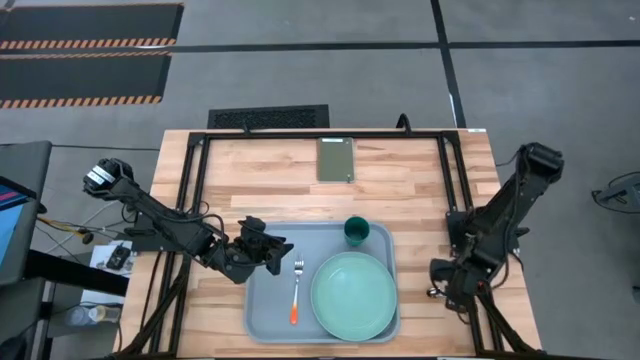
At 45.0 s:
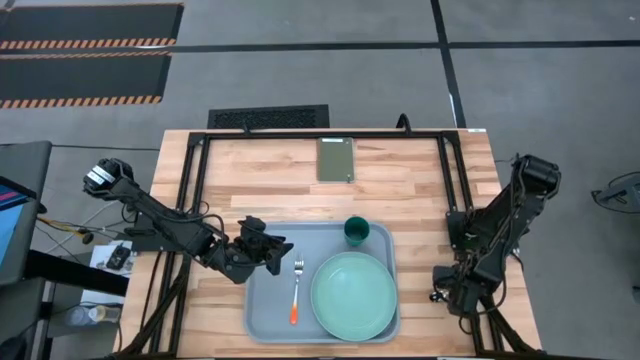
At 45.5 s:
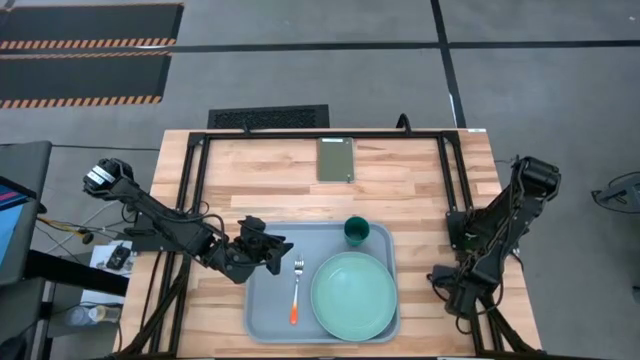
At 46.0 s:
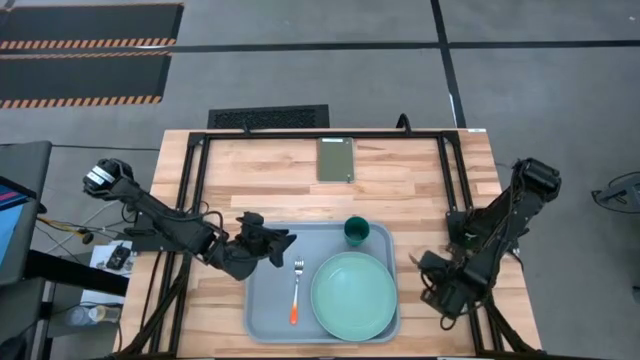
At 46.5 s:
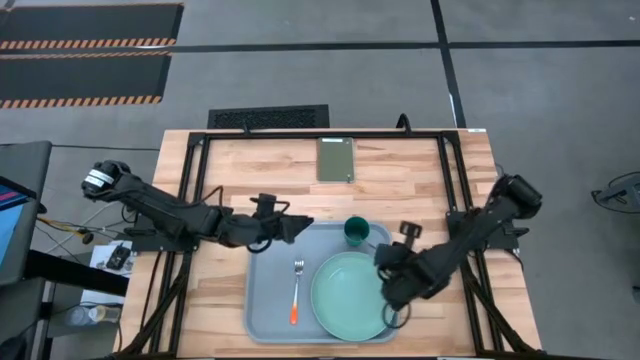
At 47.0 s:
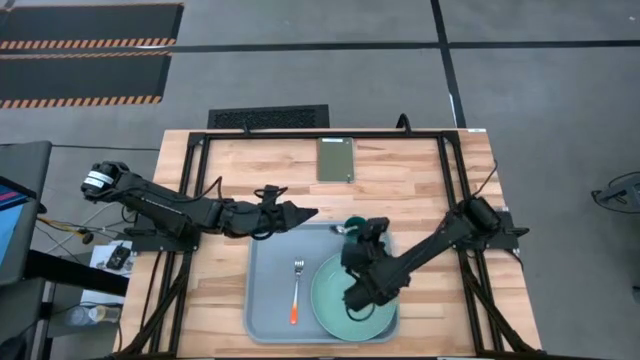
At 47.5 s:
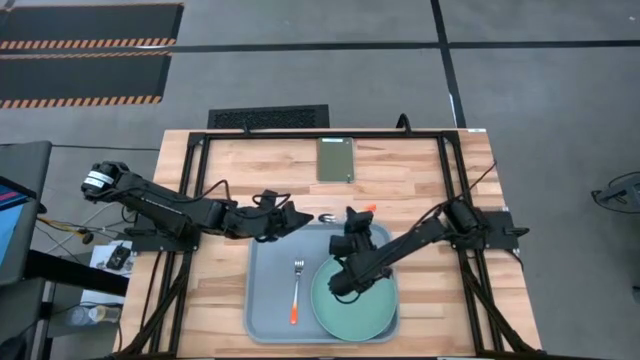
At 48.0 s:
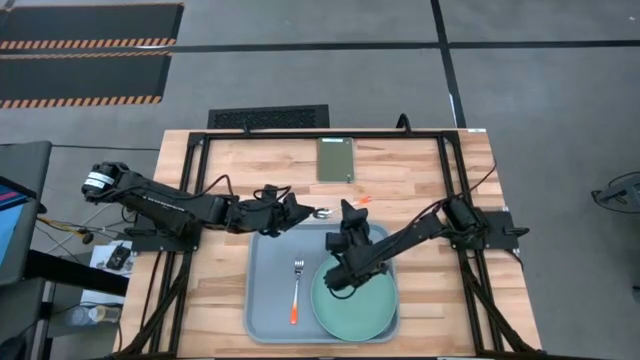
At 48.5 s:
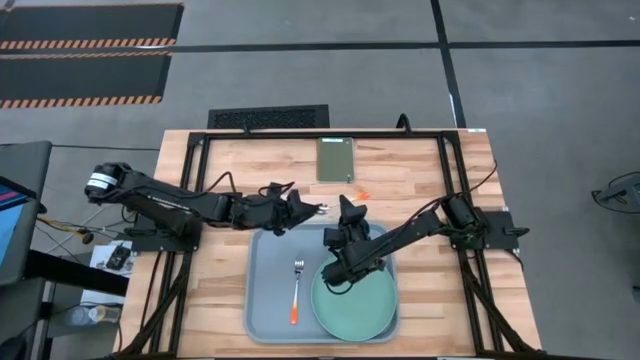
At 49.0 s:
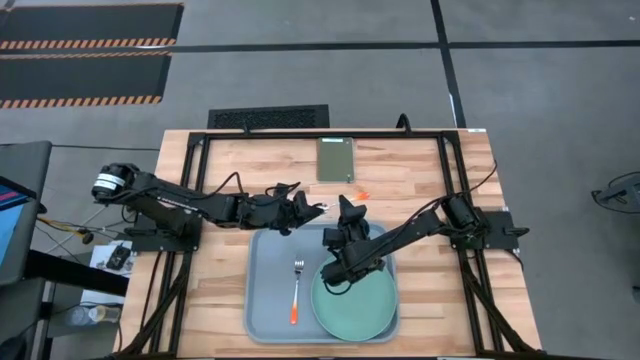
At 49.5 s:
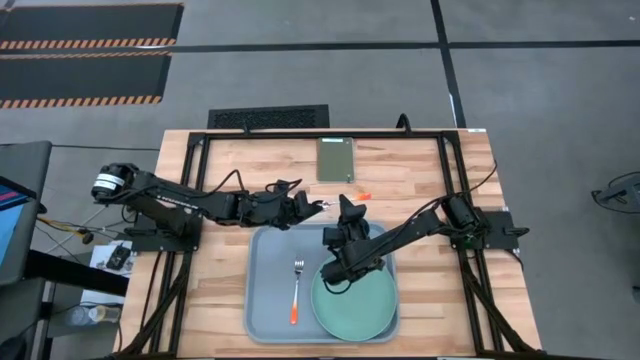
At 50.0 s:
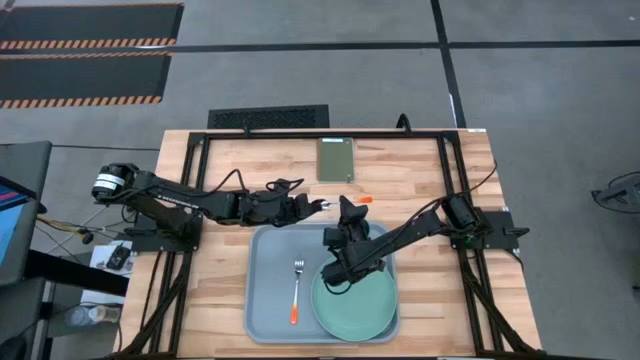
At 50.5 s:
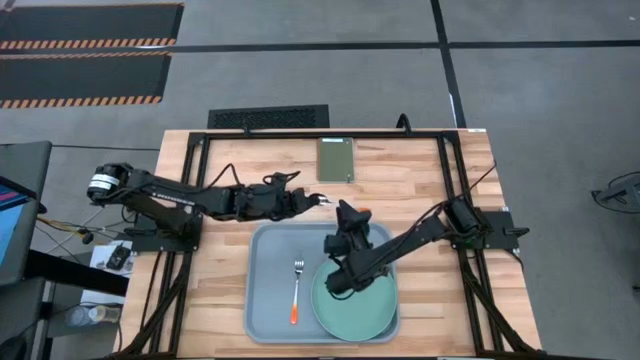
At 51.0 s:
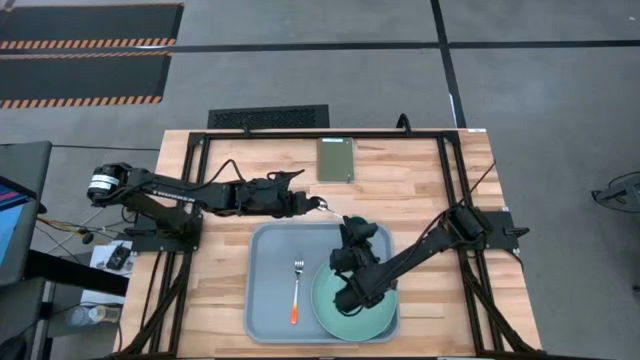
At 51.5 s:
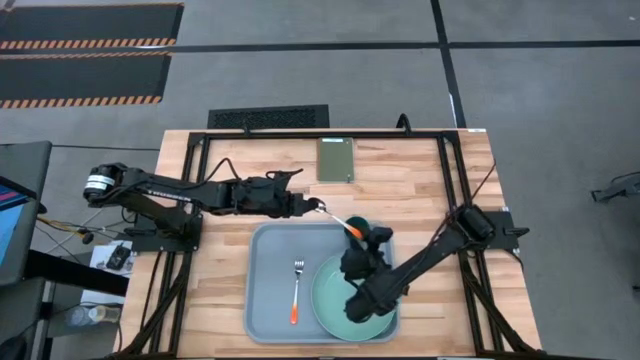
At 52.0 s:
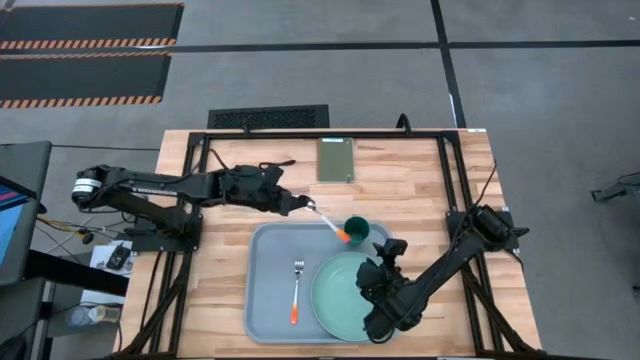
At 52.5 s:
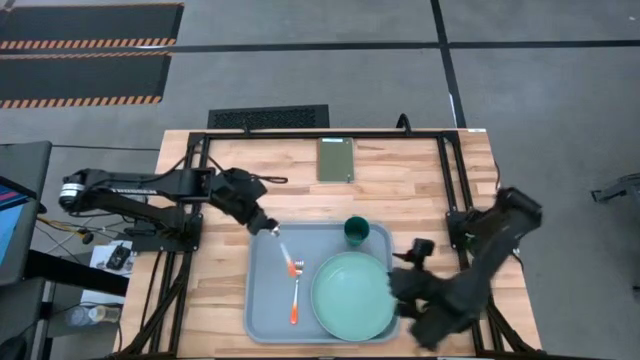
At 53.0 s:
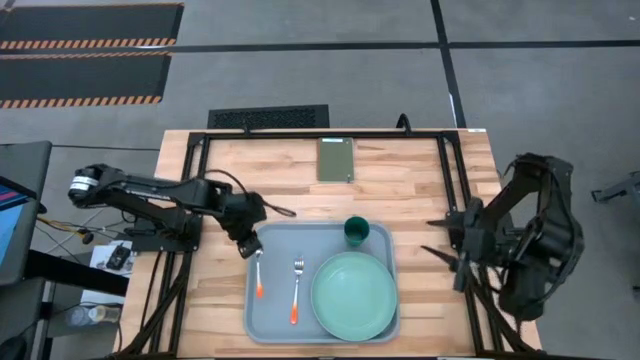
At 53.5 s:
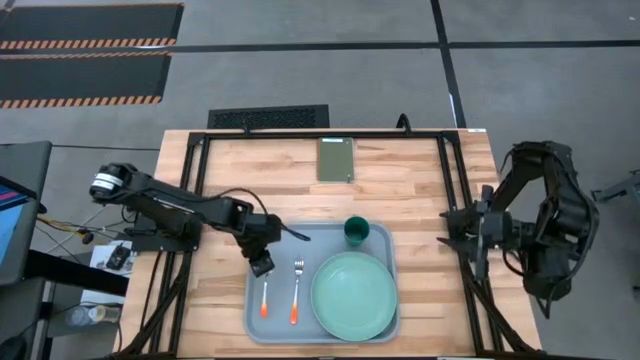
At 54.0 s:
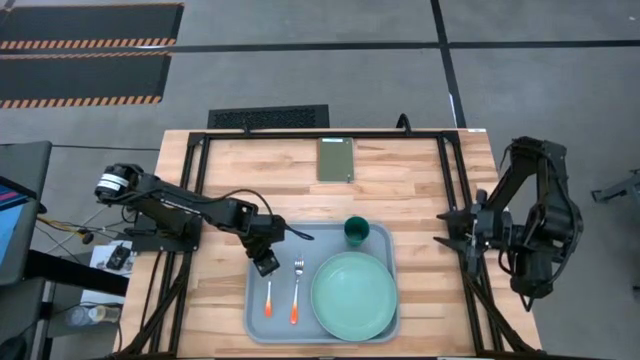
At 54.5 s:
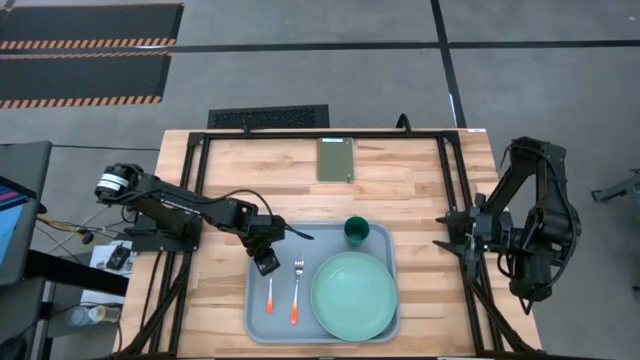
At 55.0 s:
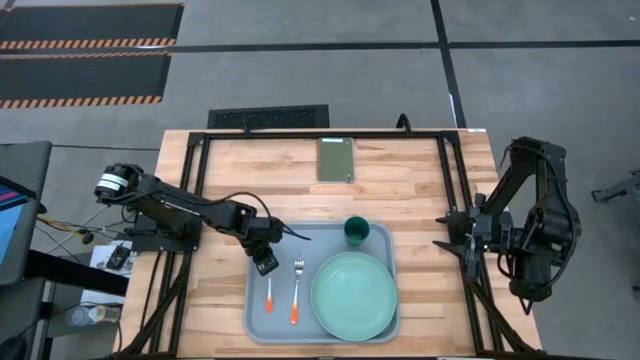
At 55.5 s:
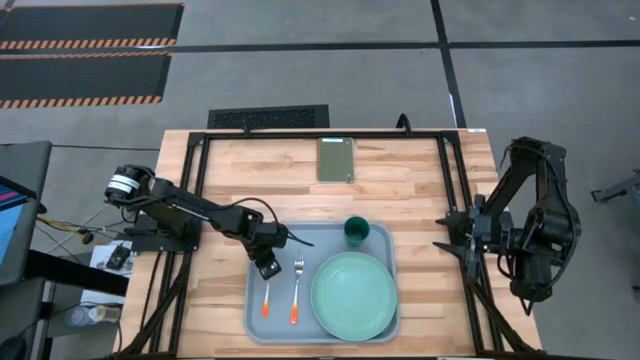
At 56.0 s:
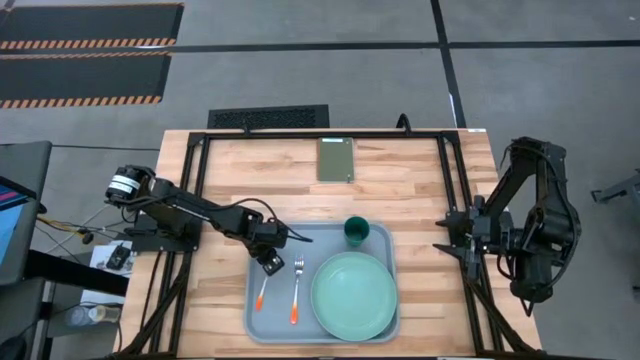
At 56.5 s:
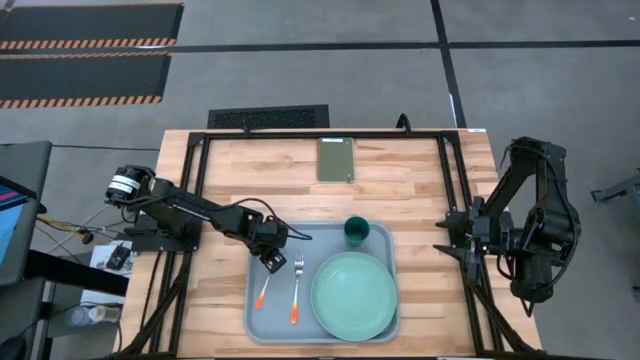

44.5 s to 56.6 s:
Task: Pick and place plate/cup/fork/spoon on tray
Put the orange spoon on the blue tray to the left of the orange fork

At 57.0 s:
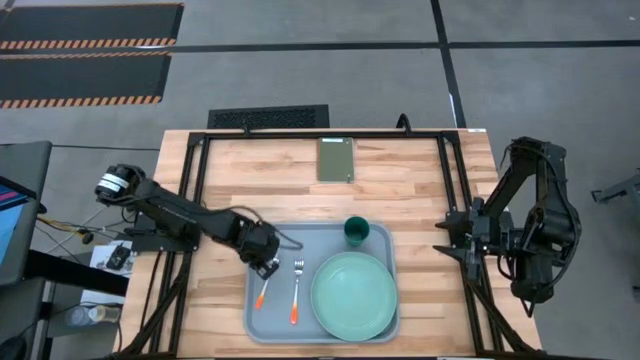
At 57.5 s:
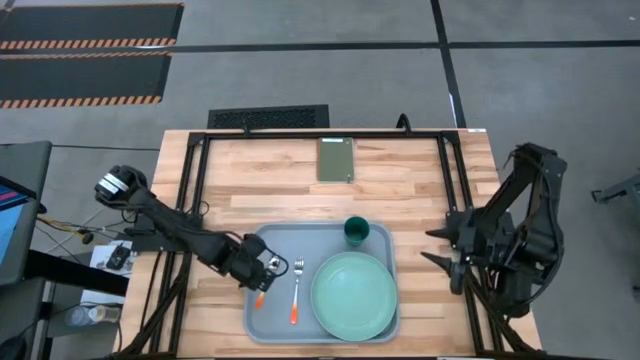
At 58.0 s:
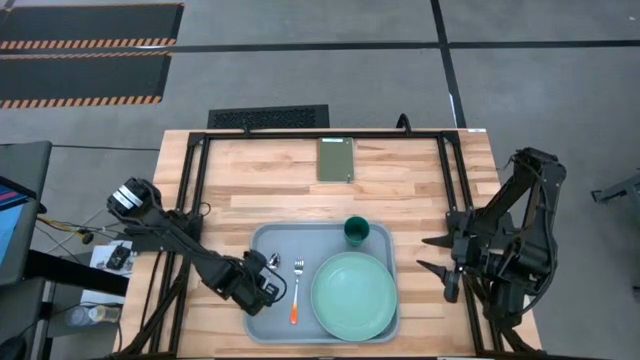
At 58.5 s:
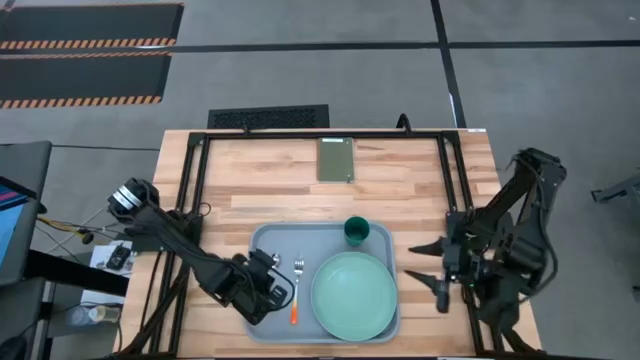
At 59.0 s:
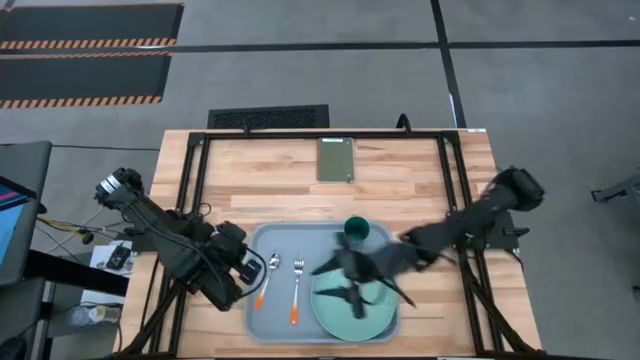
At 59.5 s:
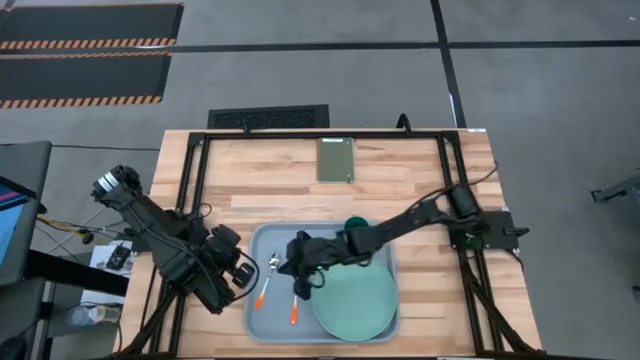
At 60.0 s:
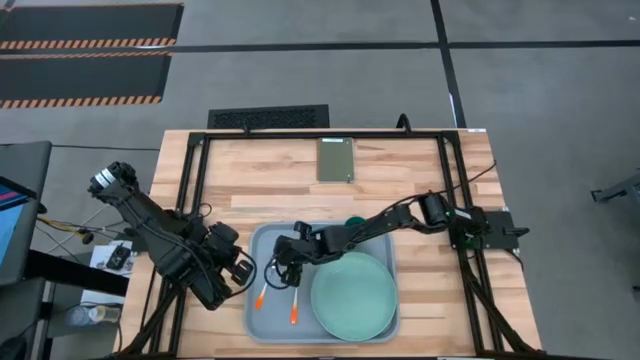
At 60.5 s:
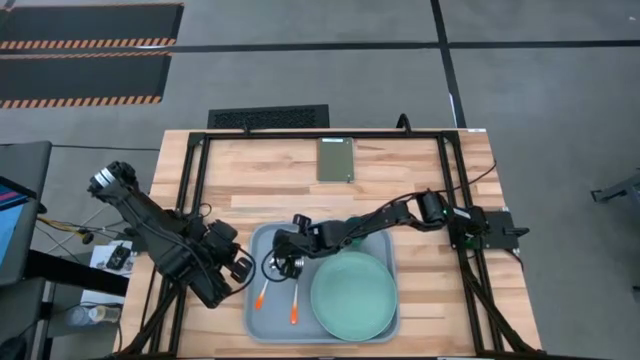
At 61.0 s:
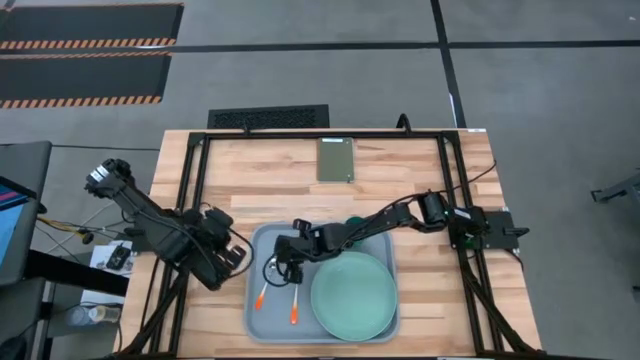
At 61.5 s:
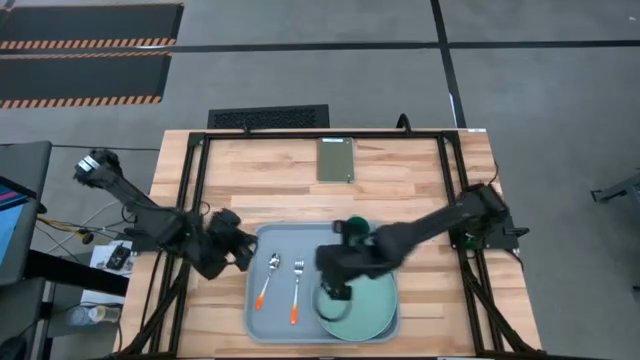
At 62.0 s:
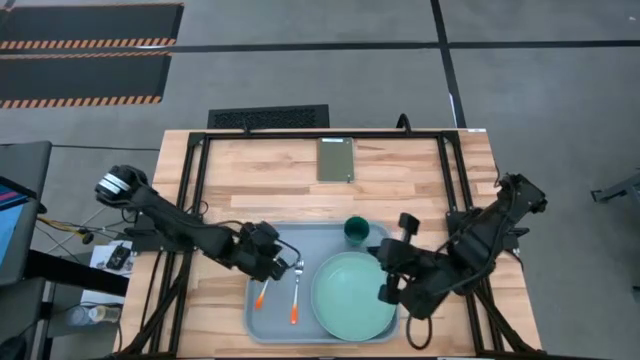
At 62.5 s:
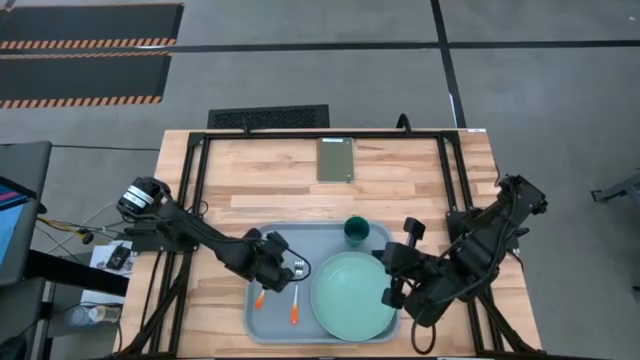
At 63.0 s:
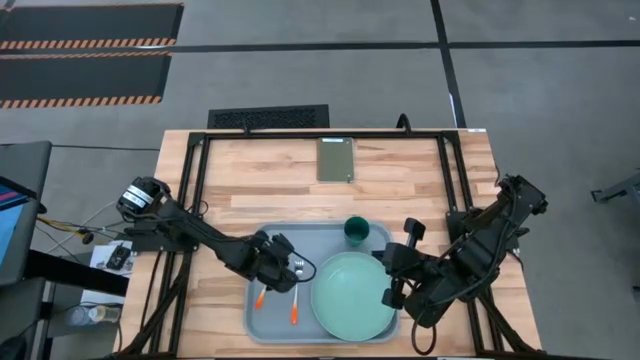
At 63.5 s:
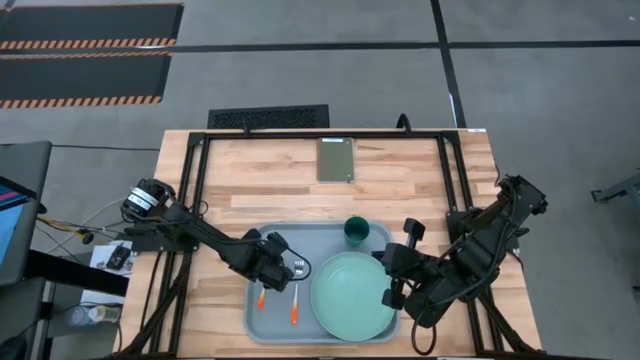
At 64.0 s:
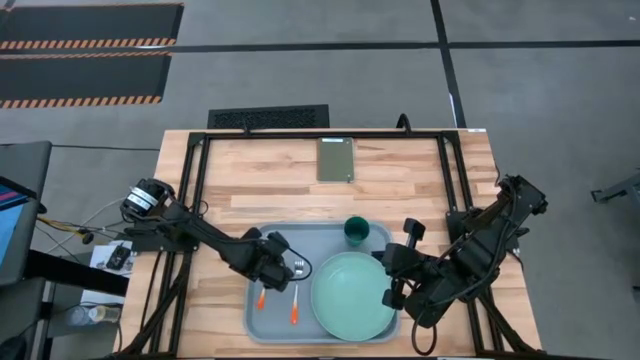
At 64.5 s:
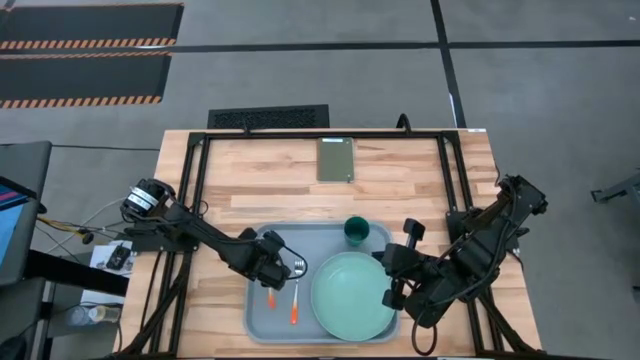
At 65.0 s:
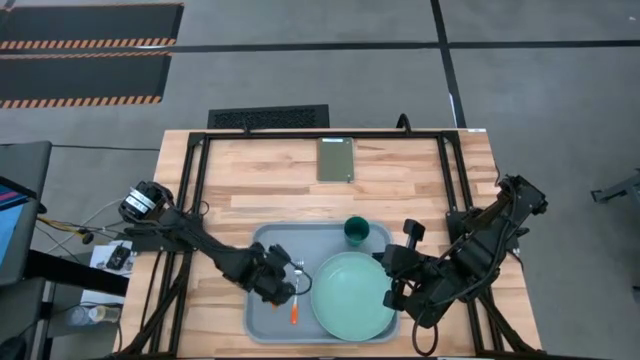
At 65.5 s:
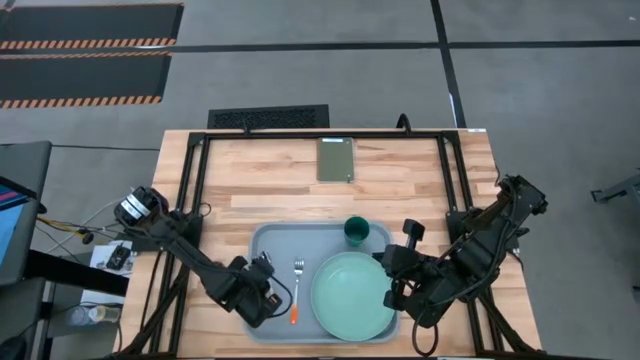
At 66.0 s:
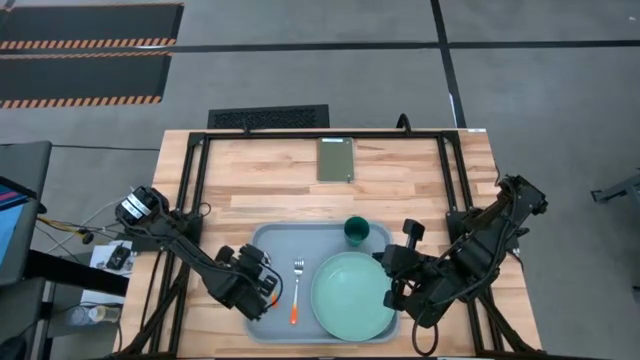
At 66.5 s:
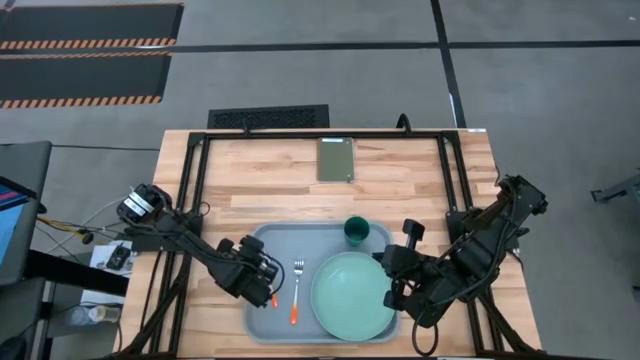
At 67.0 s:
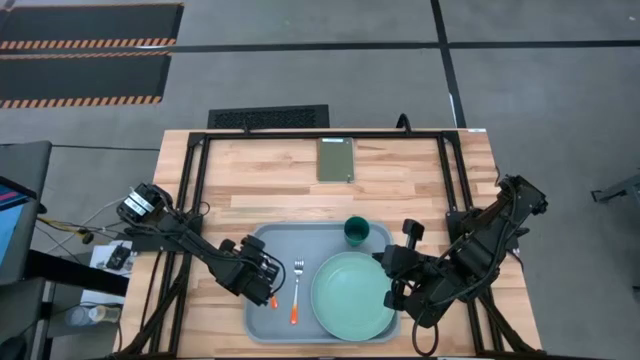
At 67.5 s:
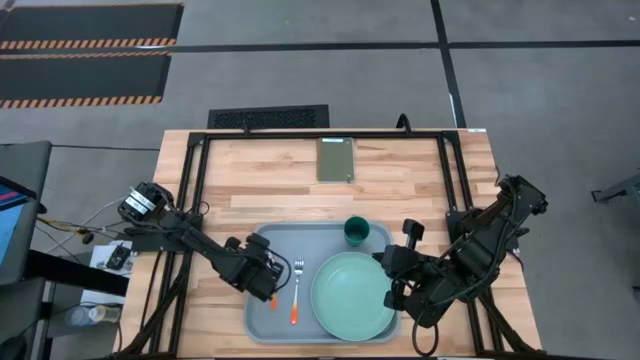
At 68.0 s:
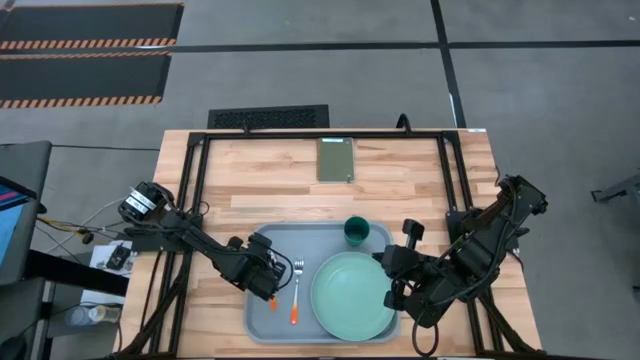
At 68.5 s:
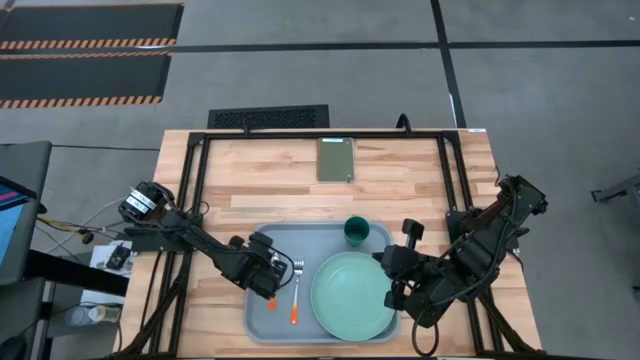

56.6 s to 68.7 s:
Put the orange spoon on the blue tray to the left of the orange fork
